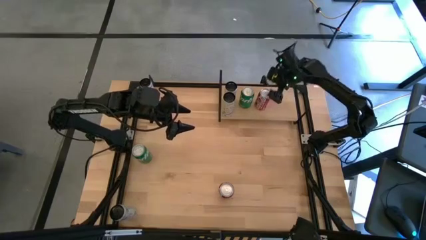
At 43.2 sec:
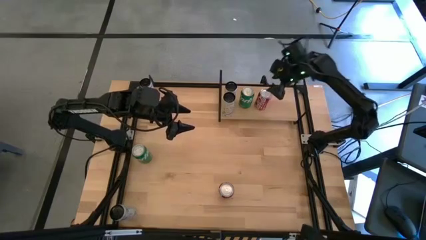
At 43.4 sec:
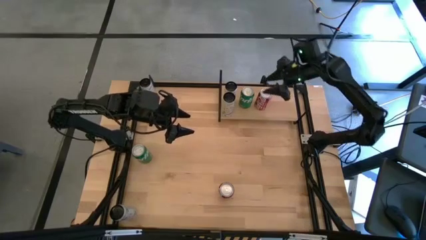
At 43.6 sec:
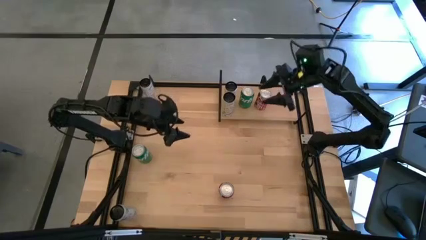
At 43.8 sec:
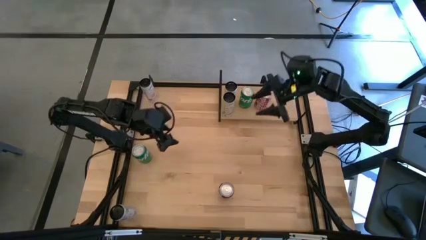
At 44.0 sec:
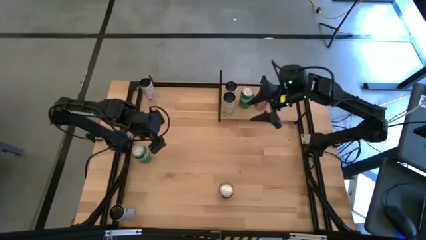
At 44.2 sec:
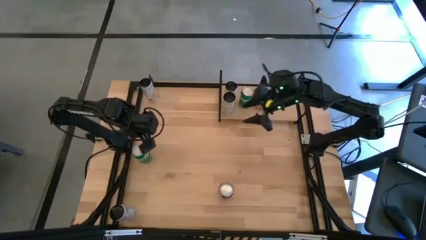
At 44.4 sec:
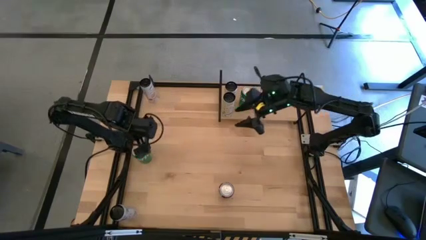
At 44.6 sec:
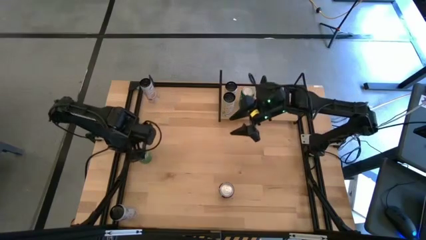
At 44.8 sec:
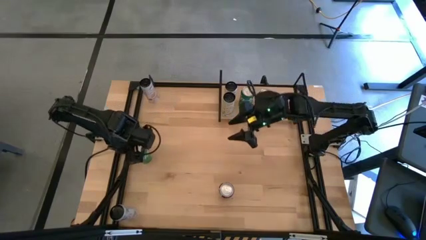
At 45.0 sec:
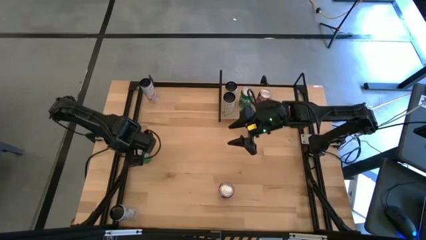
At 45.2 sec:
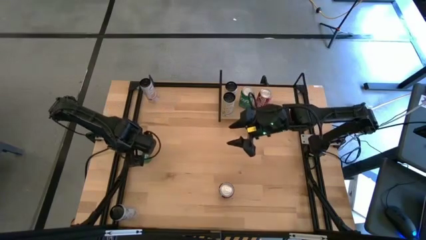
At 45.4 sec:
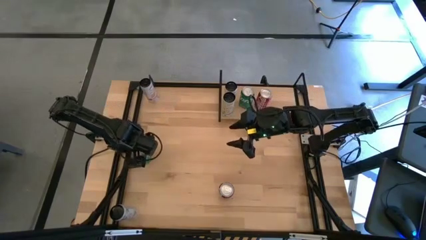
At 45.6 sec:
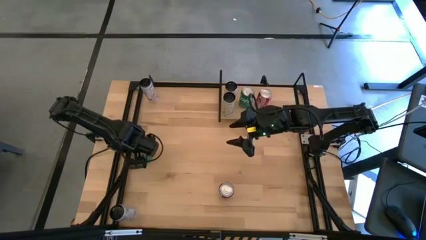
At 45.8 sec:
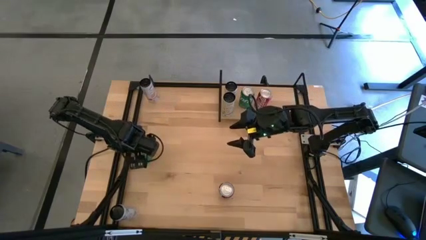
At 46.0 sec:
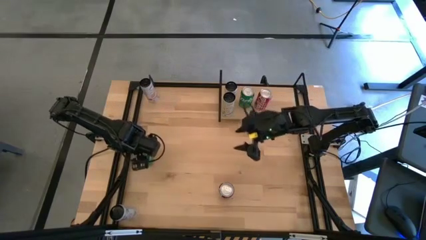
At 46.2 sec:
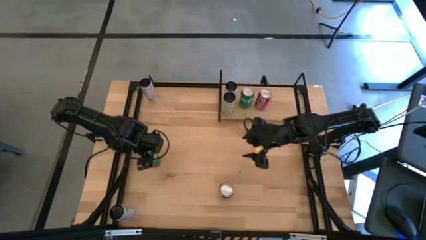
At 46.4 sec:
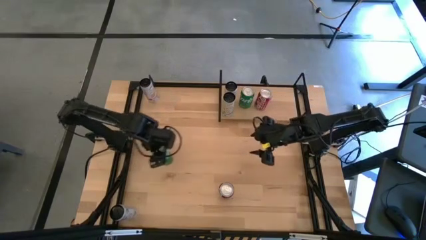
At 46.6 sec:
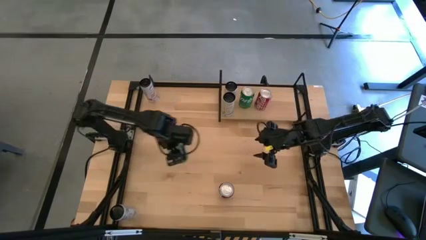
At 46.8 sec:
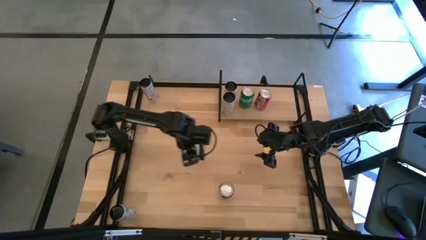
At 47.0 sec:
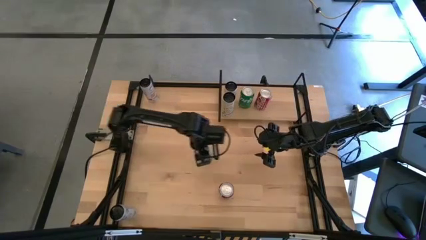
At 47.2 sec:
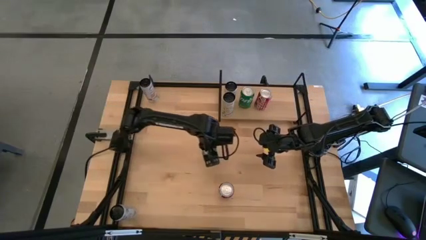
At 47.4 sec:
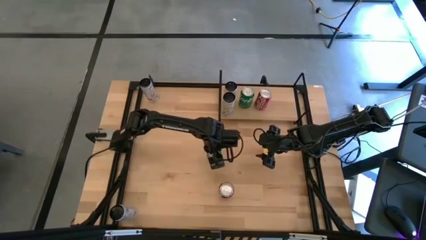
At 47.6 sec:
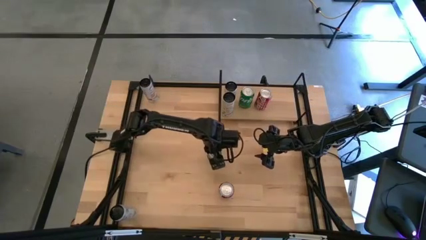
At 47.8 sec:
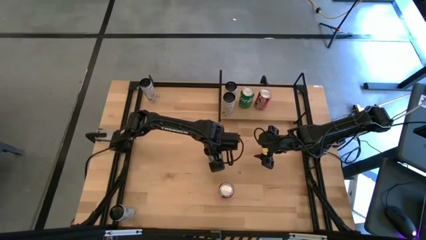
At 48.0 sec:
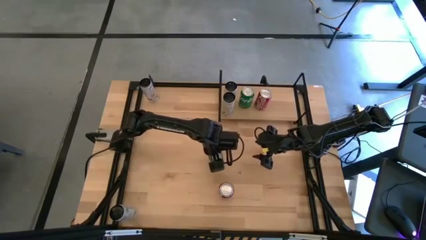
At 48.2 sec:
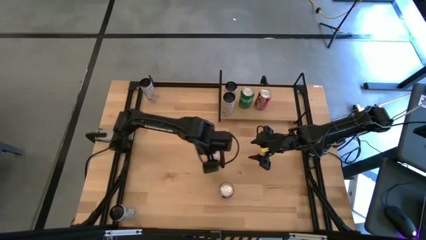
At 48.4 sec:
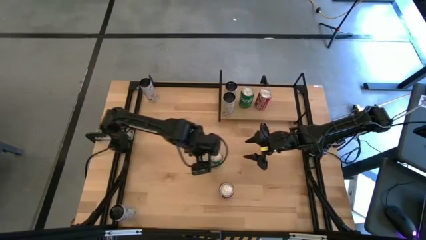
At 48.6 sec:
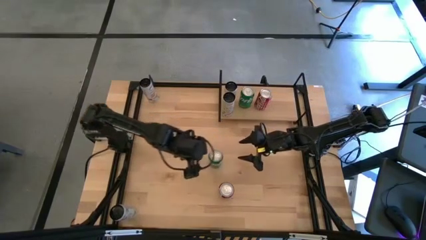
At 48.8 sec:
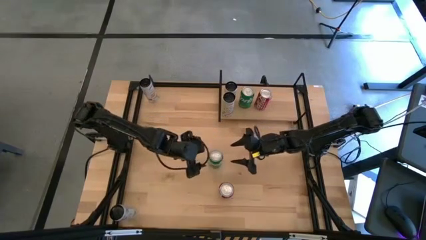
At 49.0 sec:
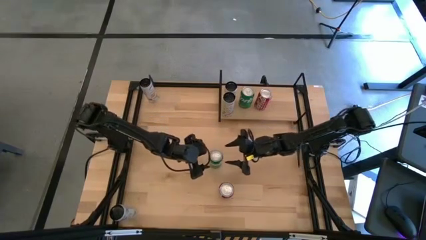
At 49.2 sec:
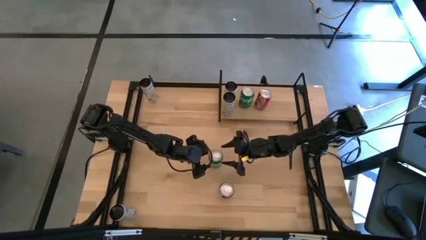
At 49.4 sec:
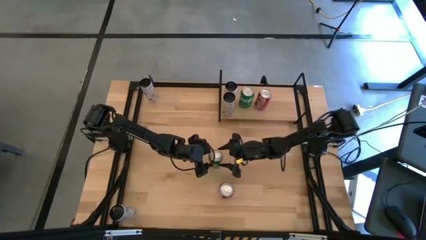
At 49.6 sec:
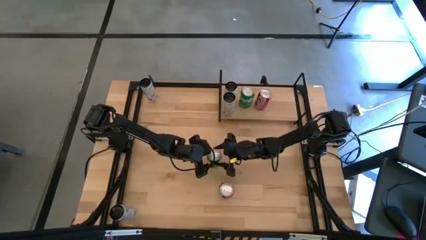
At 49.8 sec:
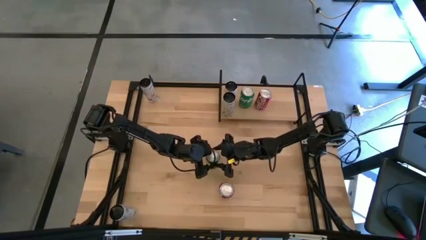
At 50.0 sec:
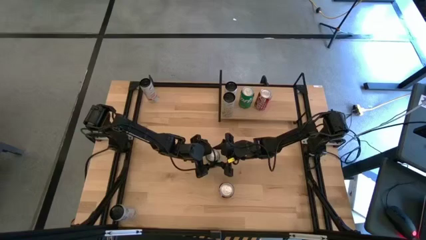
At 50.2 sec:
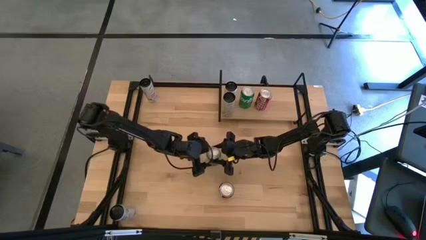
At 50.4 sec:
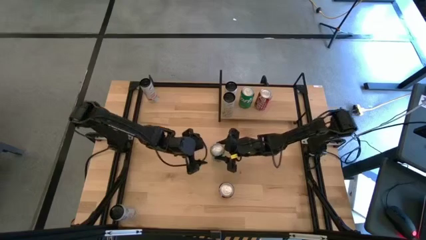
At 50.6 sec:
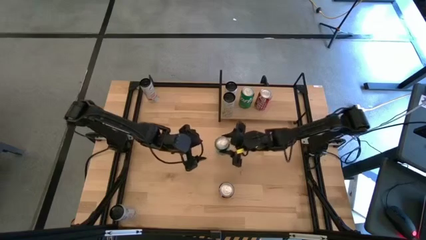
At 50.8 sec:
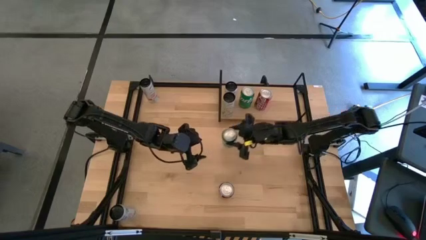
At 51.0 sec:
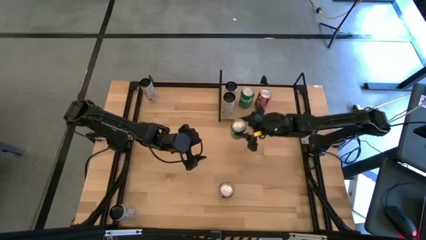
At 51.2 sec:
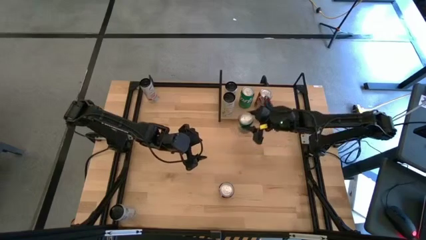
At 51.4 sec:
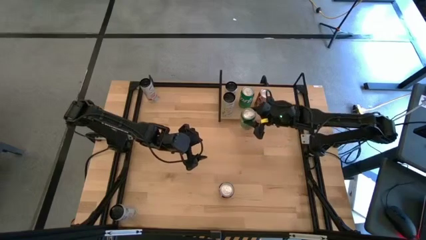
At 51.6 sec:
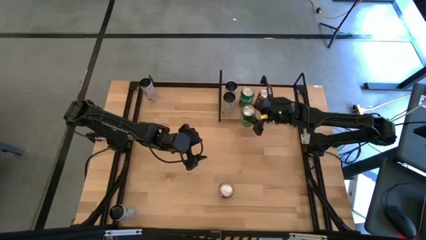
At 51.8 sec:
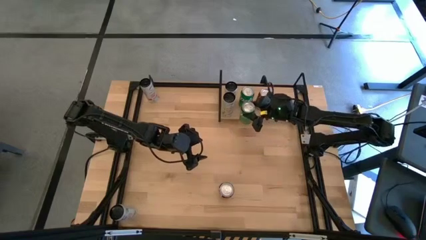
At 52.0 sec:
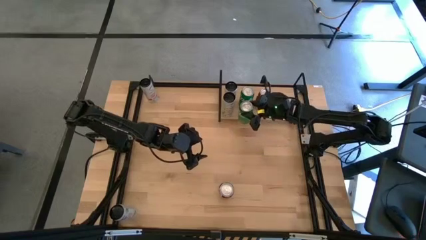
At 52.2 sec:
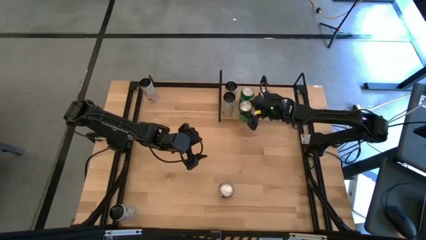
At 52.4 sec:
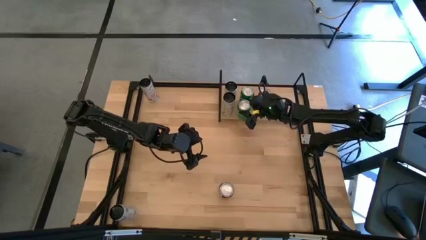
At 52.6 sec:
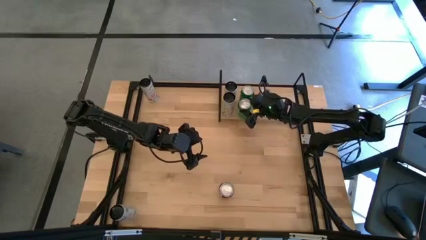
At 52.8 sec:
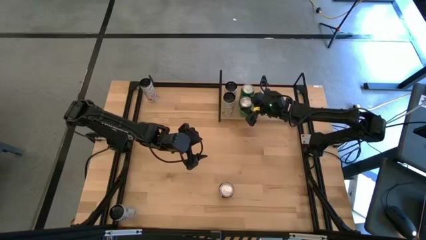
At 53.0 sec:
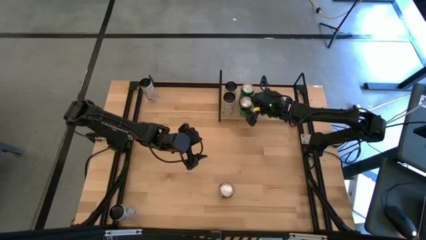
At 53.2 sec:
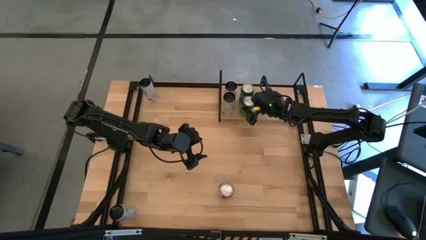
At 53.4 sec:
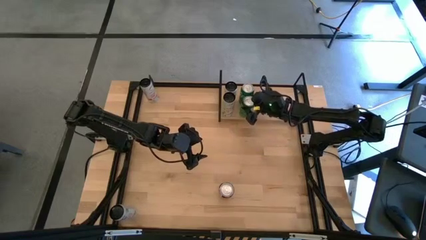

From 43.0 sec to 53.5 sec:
Task: Place canned beverage on shelf
Put the green soda can on the shelf aligned with the other green soda can

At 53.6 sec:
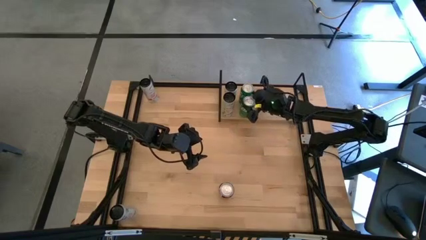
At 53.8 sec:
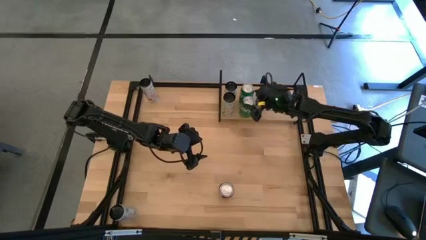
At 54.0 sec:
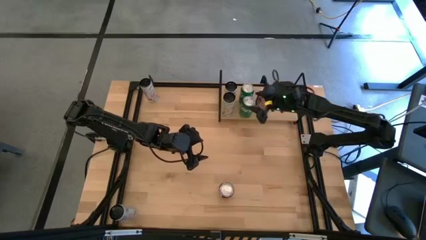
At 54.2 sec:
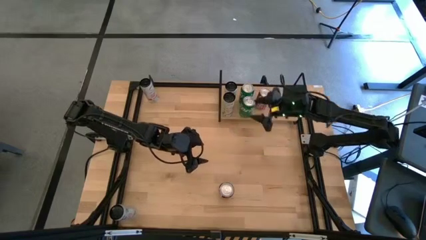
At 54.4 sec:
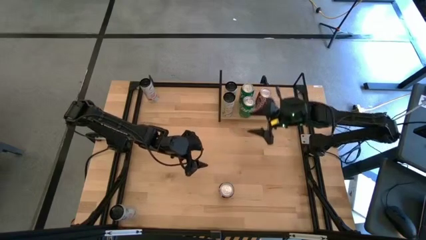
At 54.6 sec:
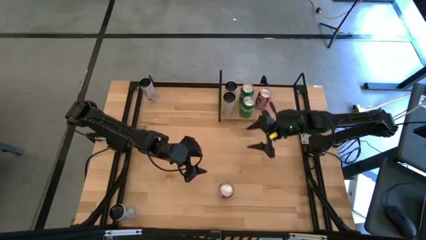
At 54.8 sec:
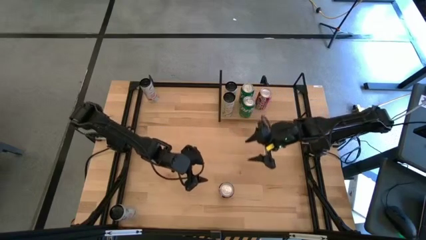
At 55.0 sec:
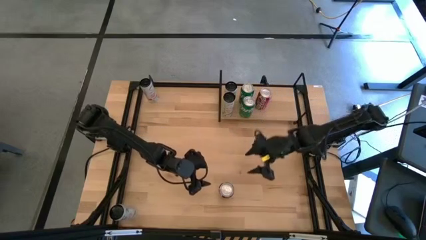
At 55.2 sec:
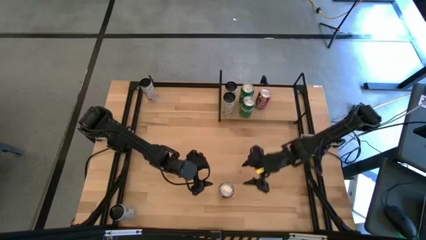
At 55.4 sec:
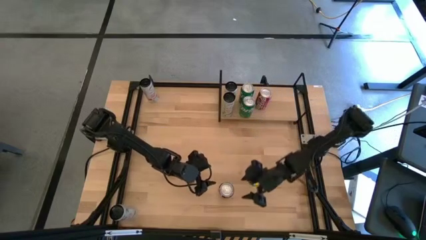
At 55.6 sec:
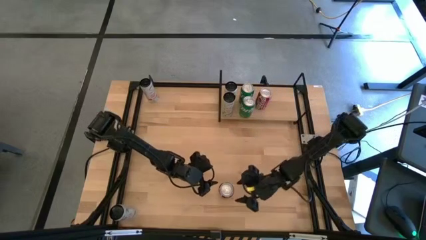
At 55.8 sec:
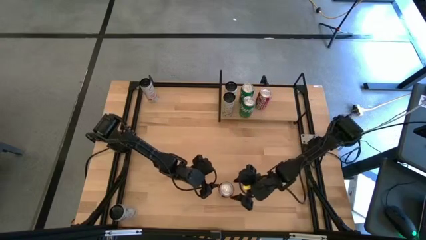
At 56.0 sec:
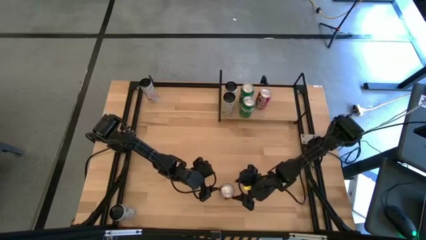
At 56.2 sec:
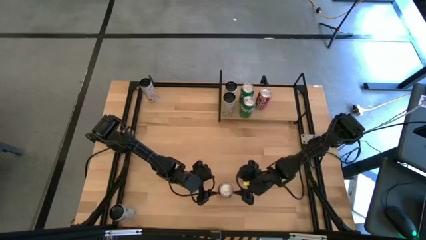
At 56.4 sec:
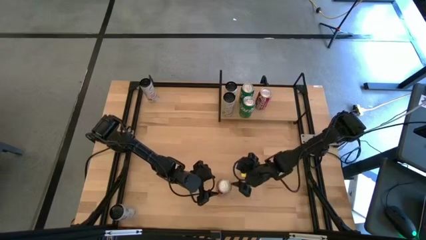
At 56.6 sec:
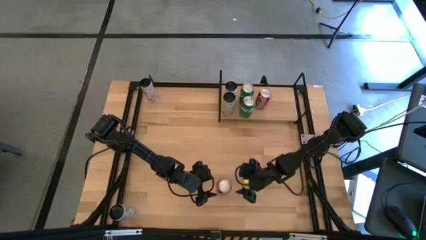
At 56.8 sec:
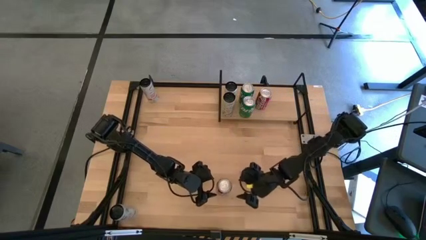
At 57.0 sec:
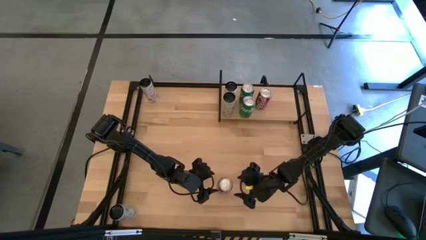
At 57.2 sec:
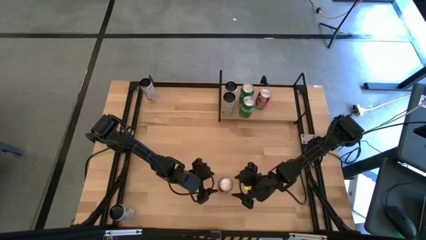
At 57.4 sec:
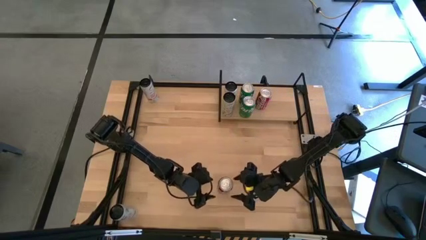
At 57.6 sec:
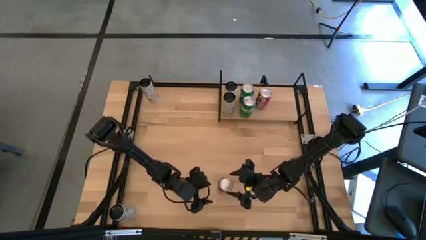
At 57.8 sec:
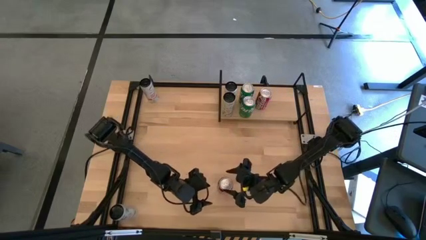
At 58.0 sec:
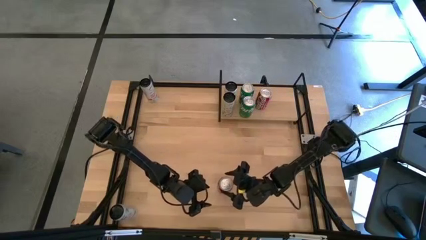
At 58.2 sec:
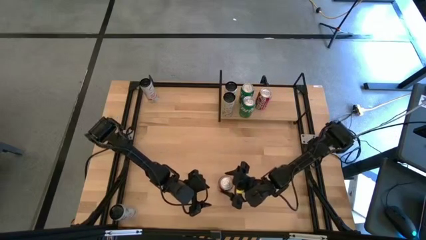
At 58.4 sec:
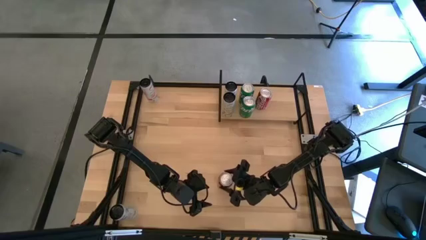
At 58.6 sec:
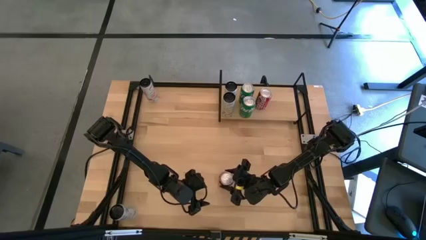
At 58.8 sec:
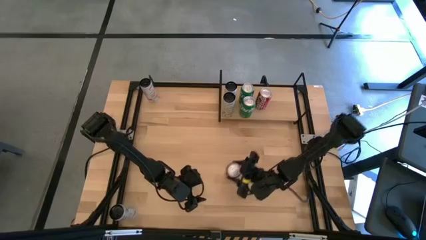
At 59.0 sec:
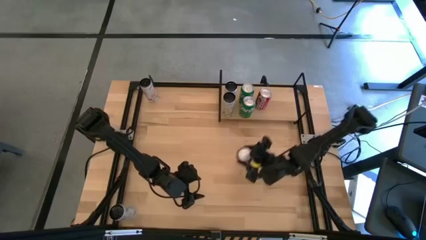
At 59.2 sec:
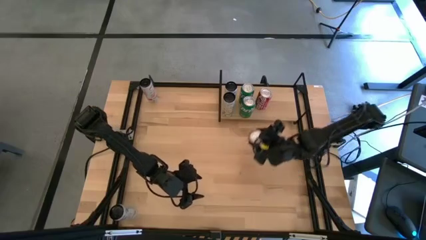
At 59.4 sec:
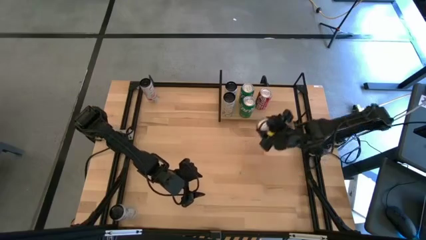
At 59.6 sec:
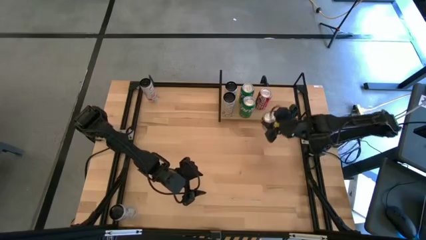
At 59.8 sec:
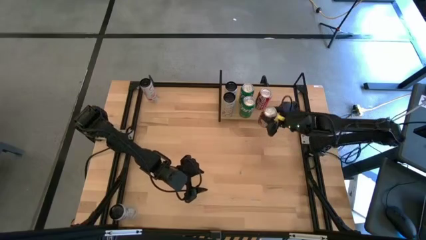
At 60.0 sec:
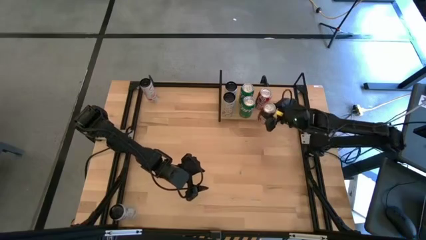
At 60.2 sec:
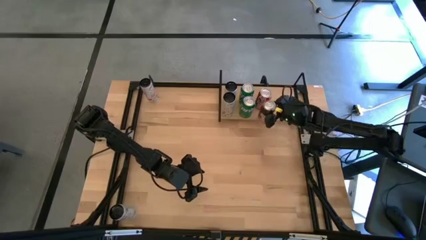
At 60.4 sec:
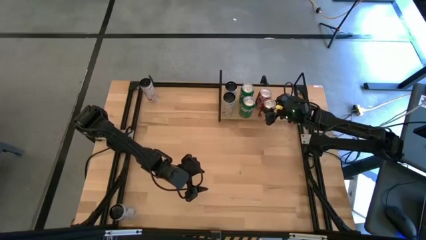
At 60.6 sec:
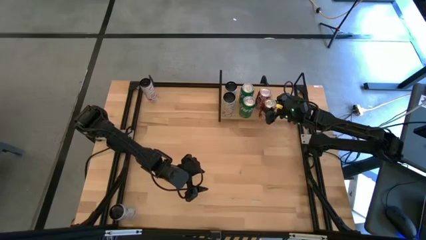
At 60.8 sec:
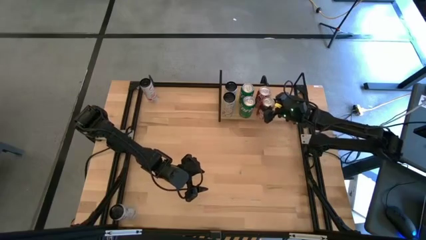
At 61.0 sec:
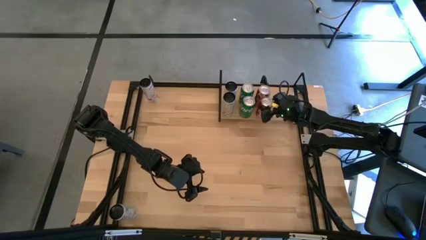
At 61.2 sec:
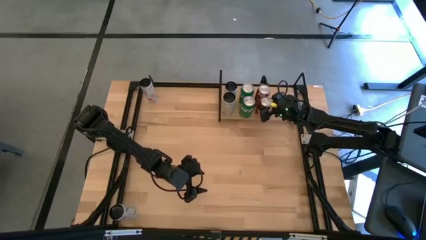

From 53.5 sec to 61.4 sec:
Put the red-white soda can on the shelf aligned with the other red-white soda can
